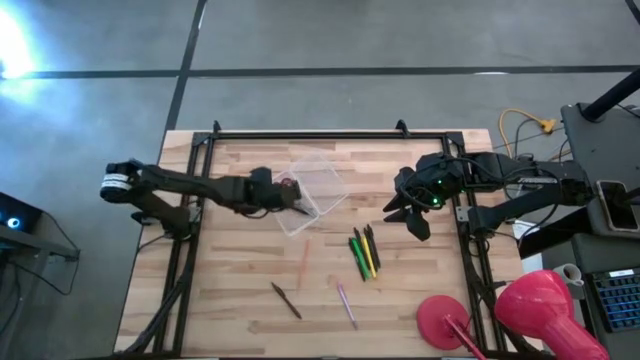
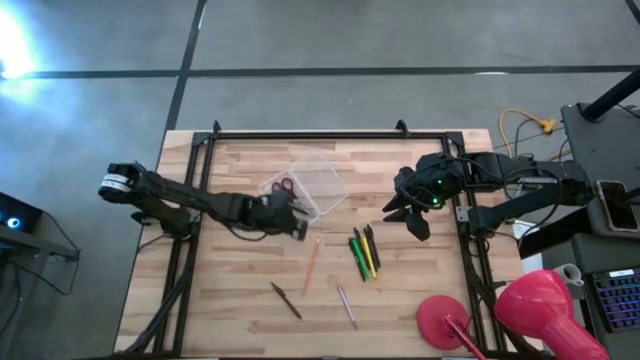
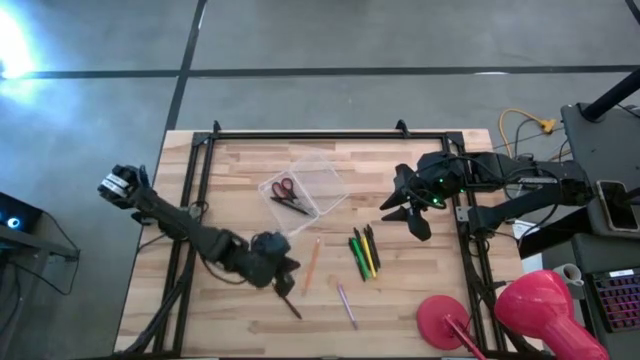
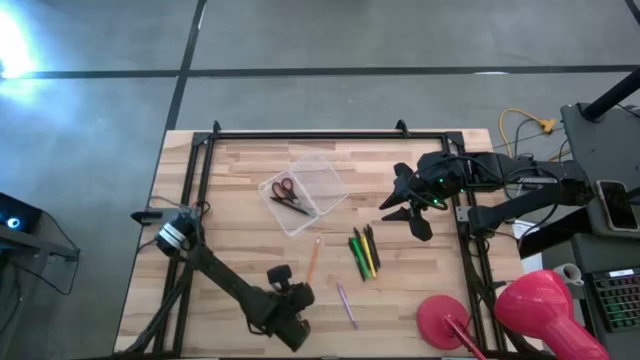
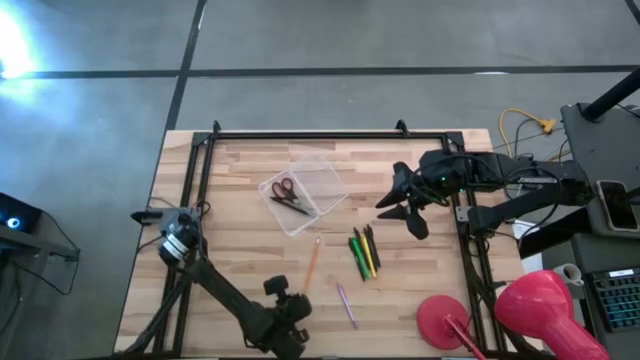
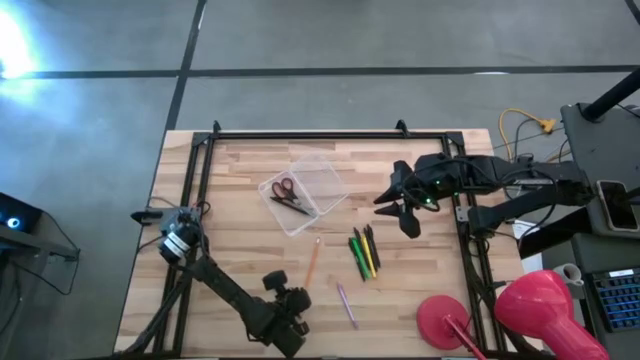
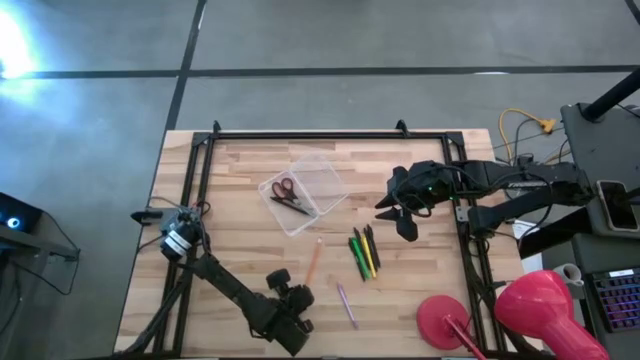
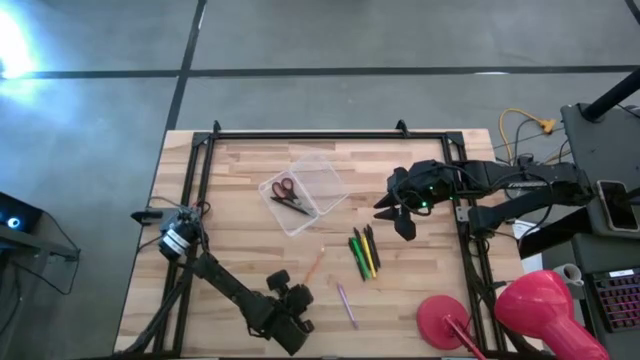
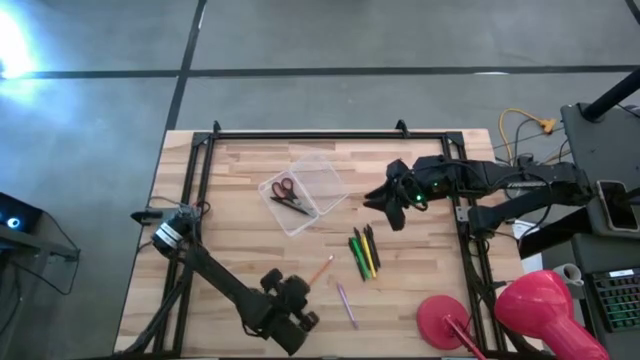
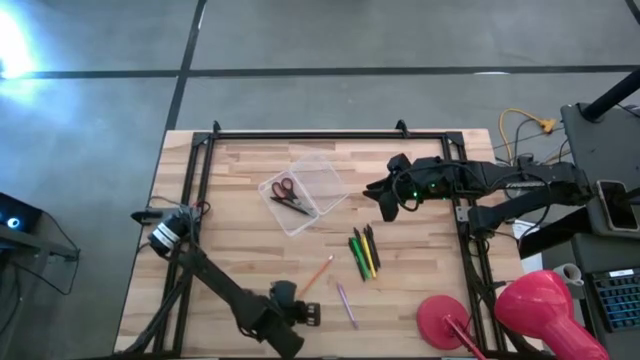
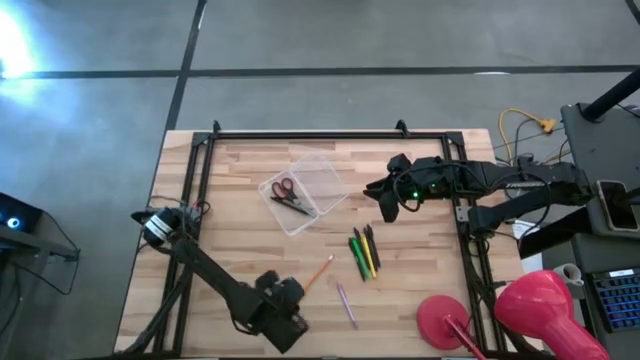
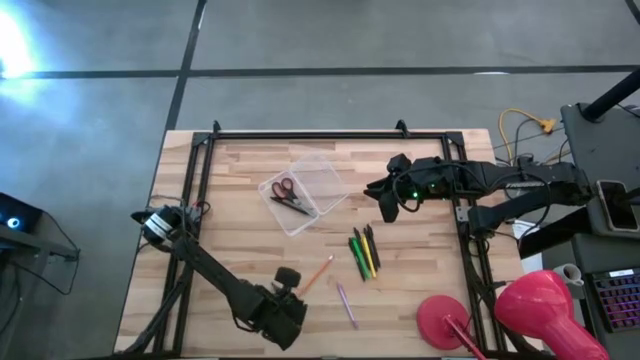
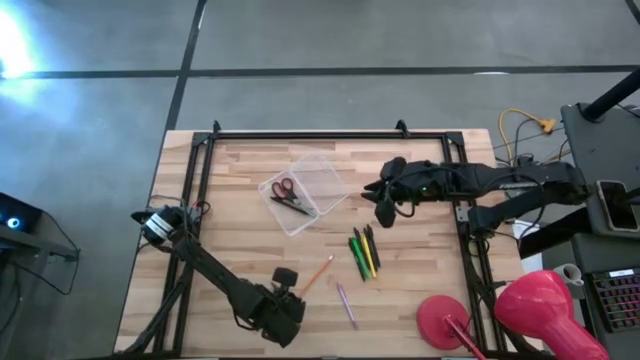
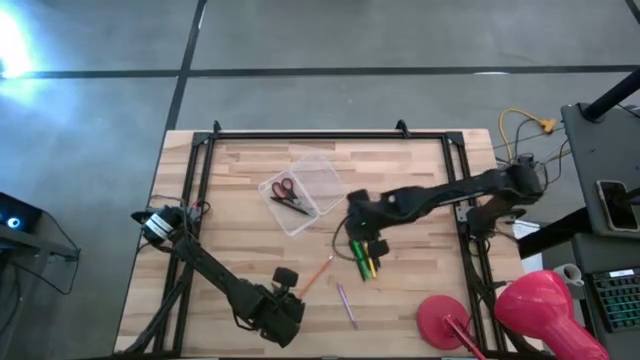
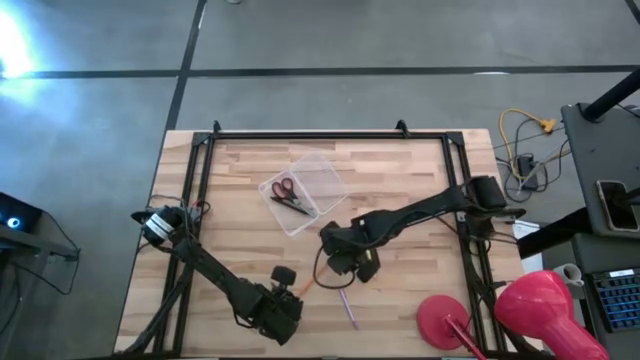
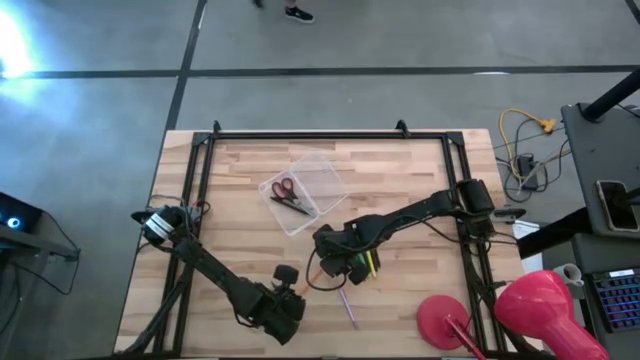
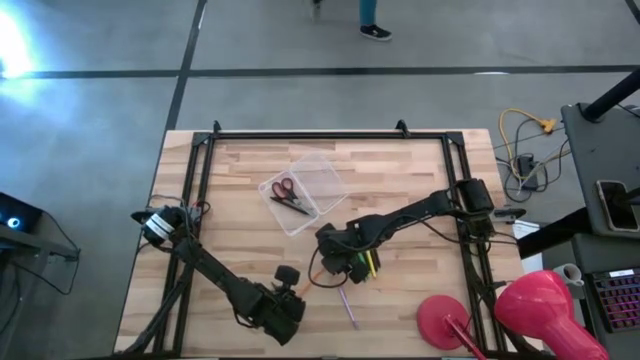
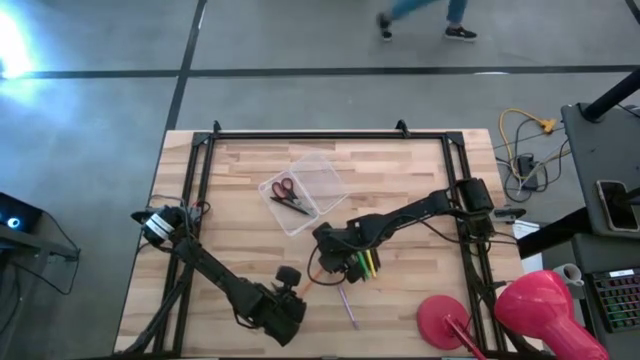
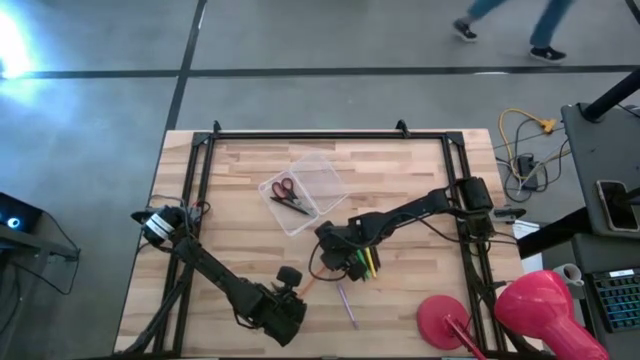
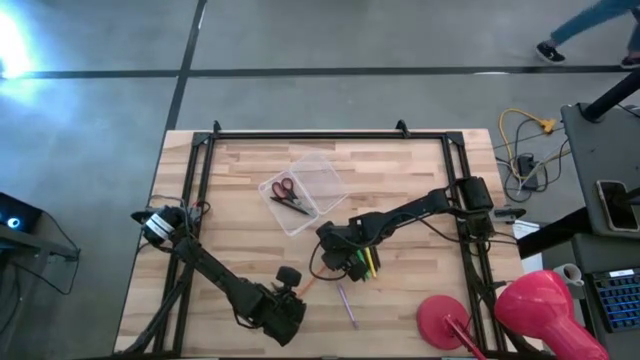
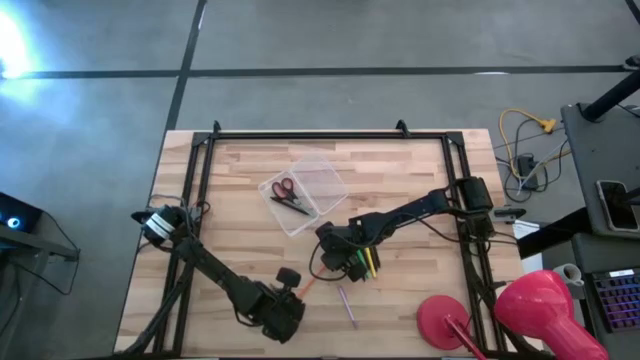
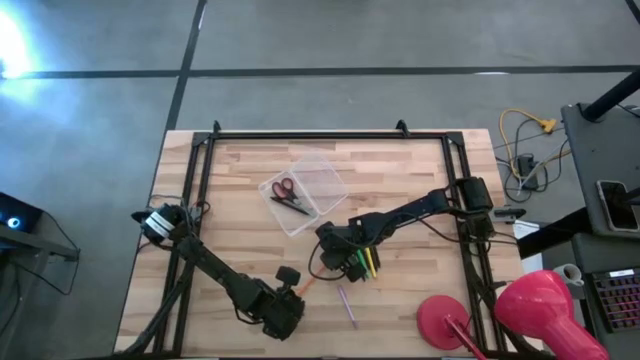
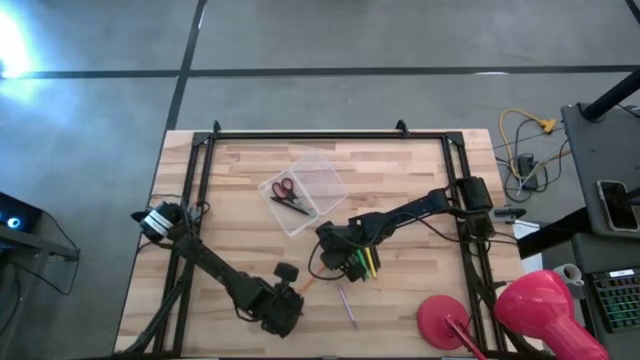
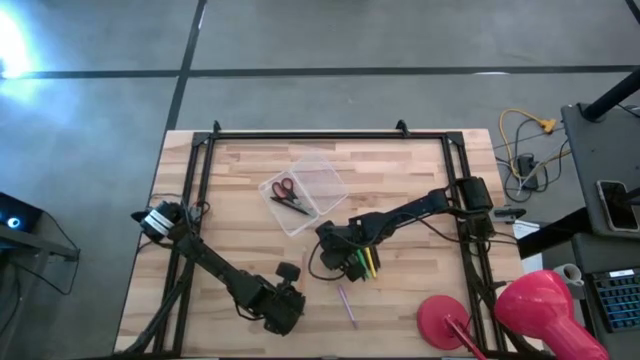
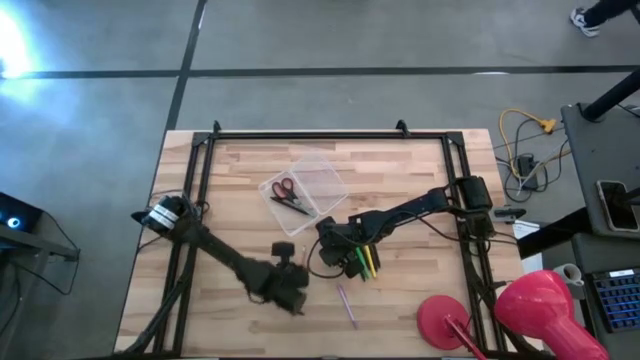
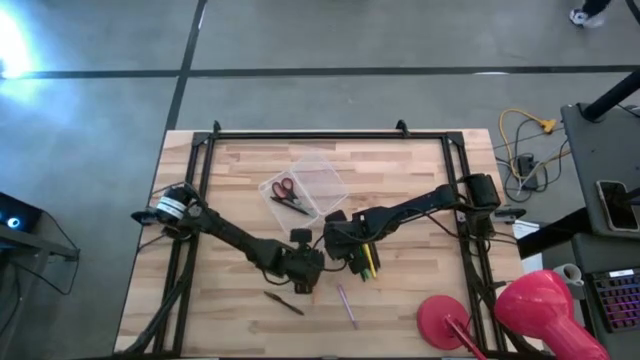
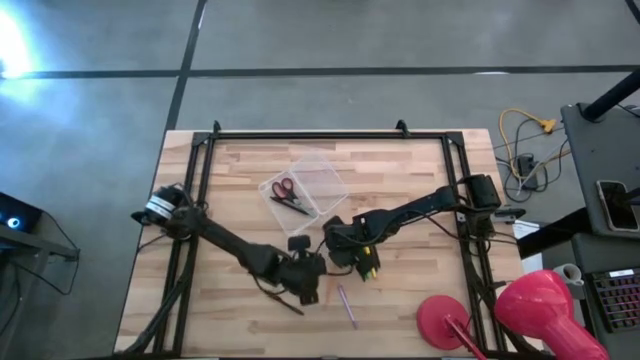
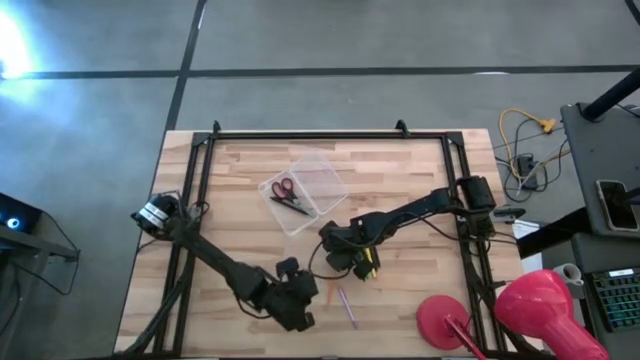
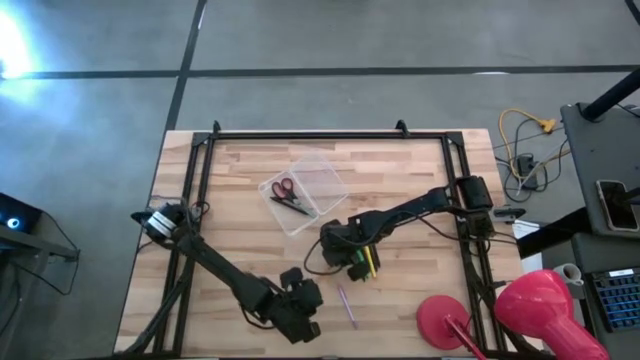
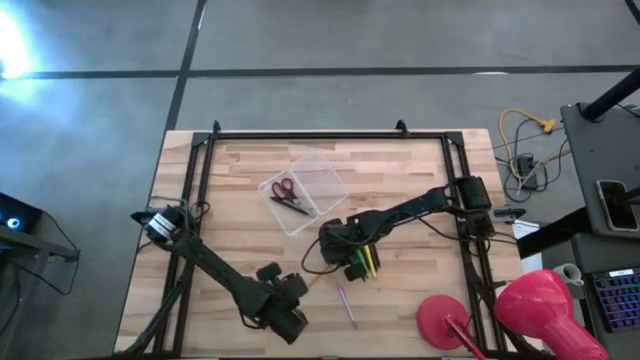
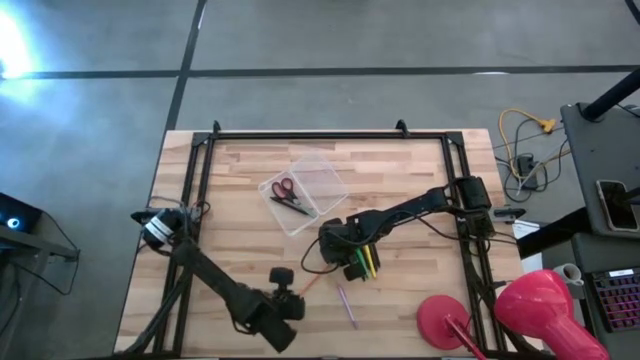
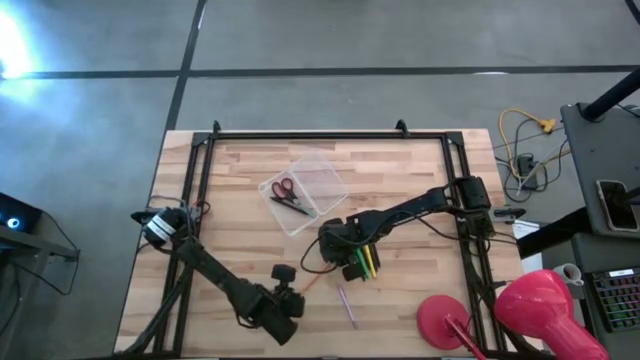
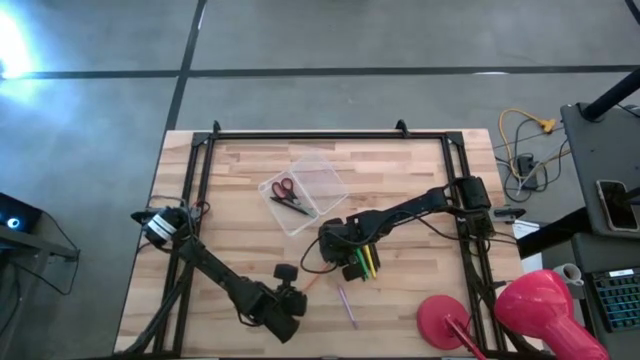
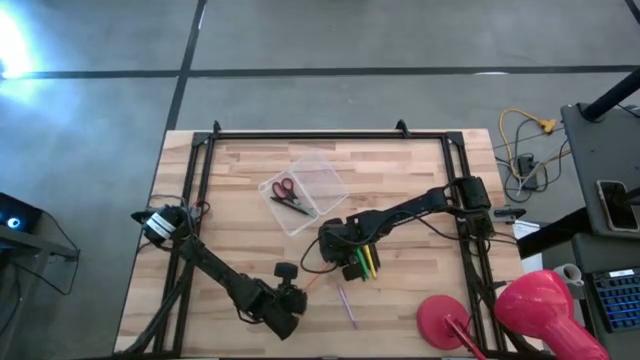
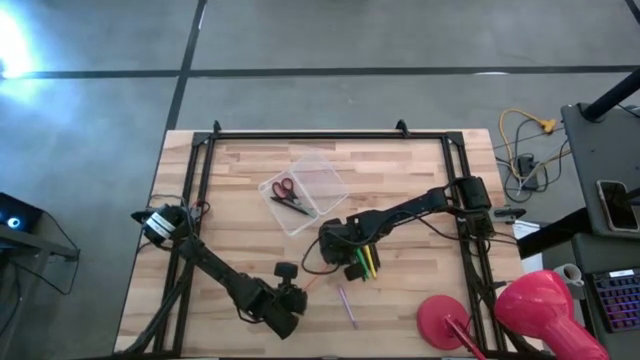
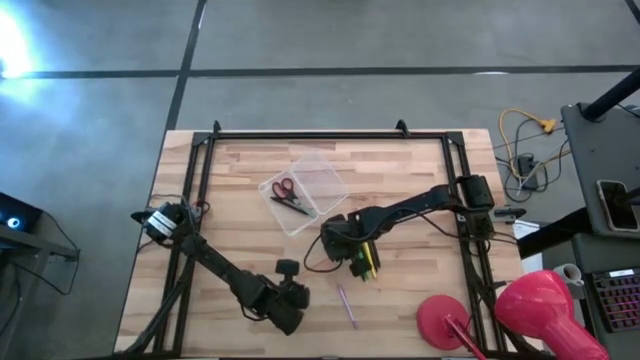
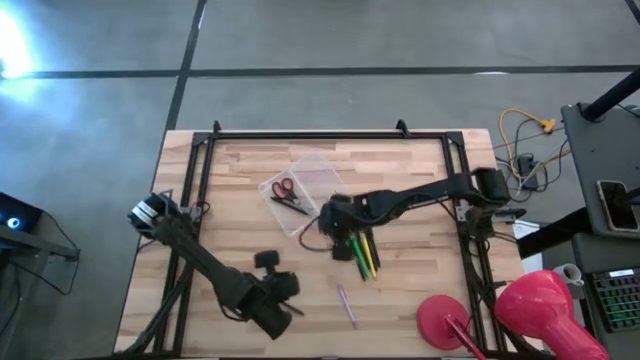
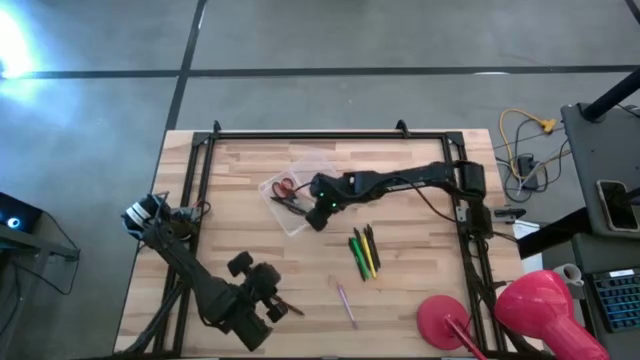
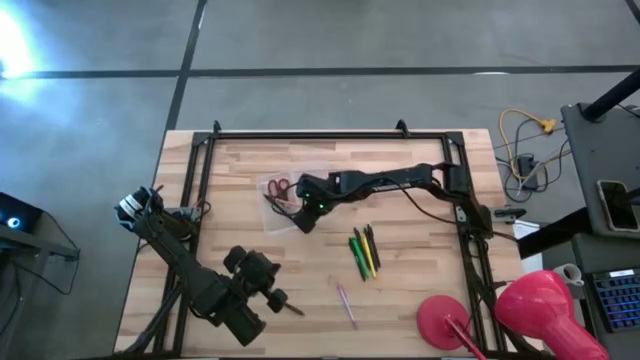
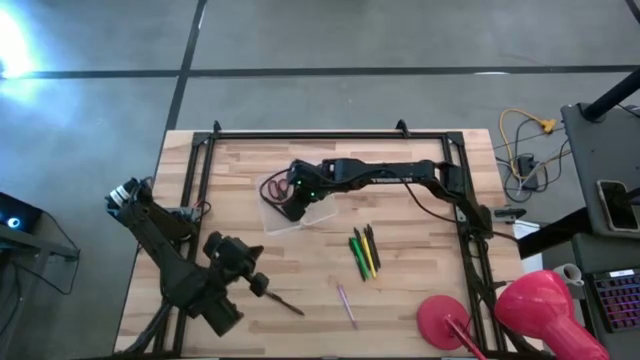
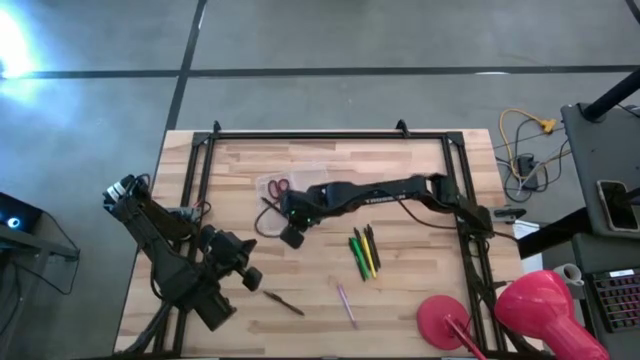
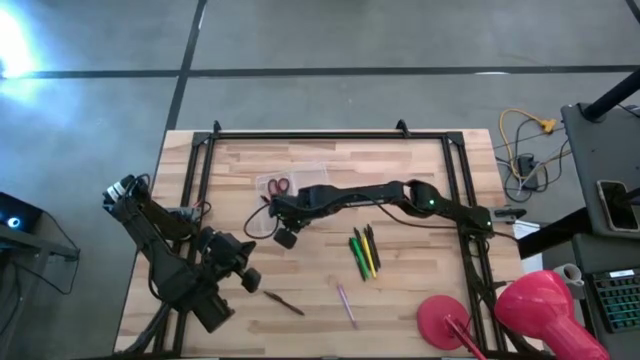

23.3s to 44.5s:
Task: Pick & place school supplies into a supply box
Put the yellow pencil into the transparent supply box
